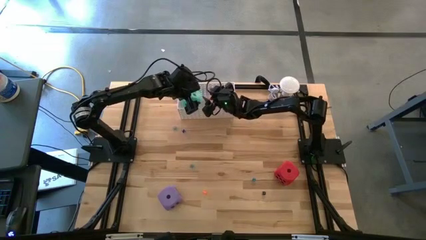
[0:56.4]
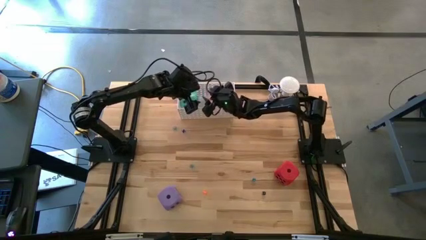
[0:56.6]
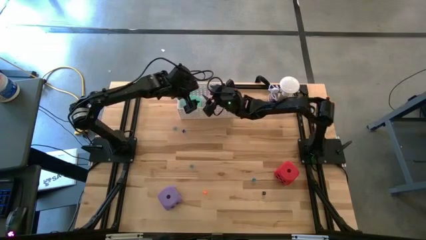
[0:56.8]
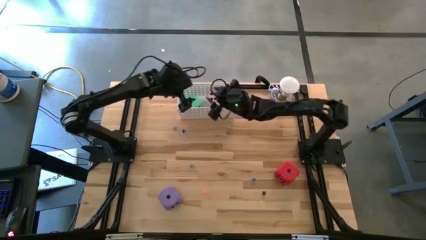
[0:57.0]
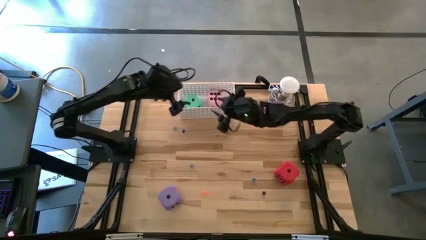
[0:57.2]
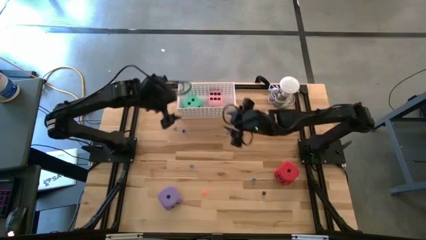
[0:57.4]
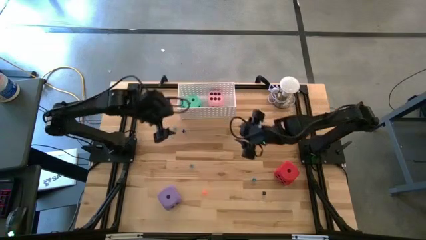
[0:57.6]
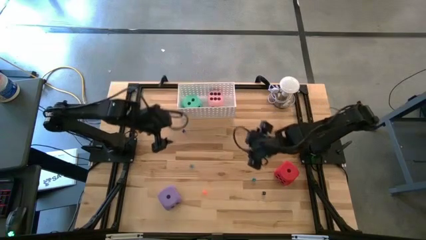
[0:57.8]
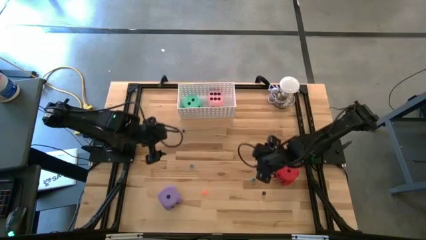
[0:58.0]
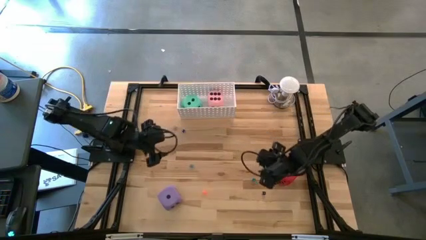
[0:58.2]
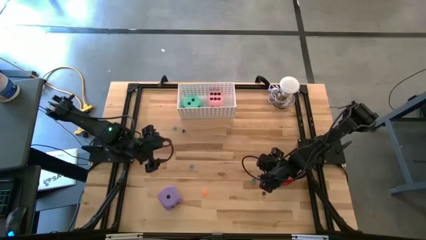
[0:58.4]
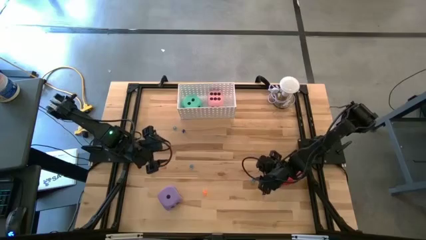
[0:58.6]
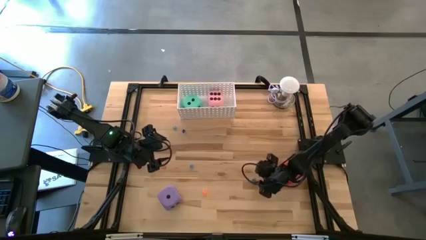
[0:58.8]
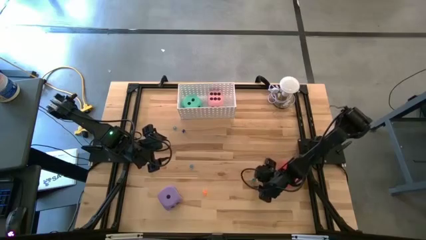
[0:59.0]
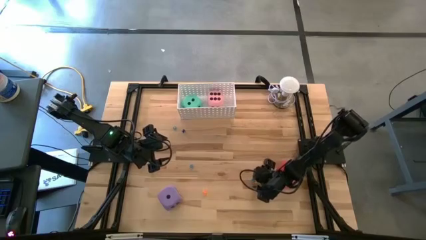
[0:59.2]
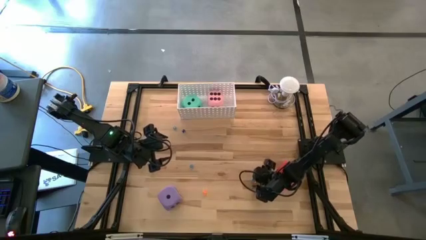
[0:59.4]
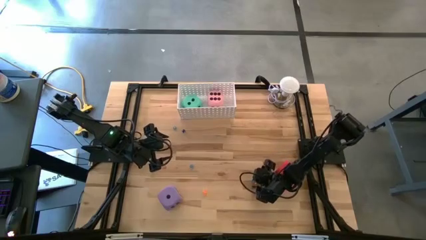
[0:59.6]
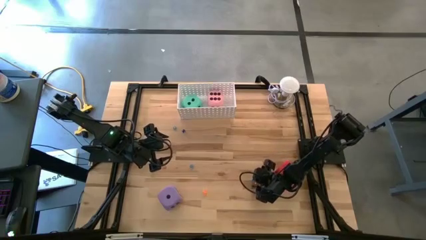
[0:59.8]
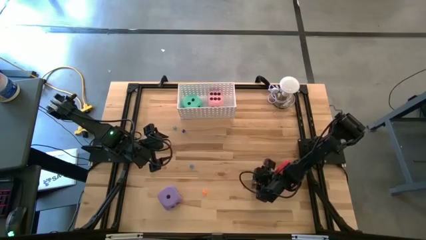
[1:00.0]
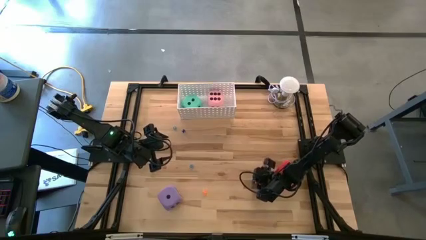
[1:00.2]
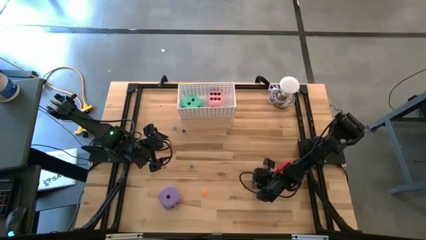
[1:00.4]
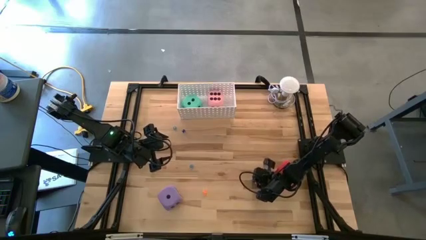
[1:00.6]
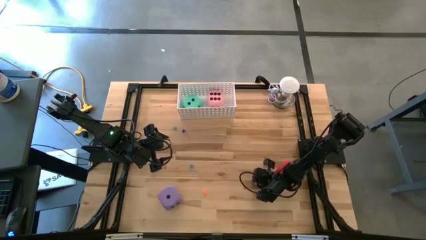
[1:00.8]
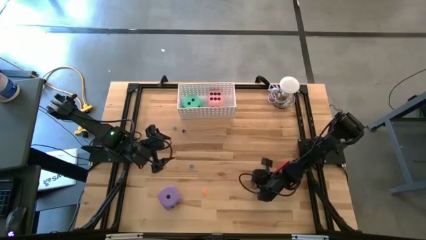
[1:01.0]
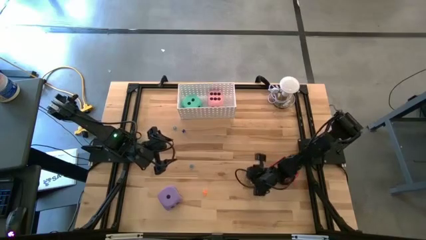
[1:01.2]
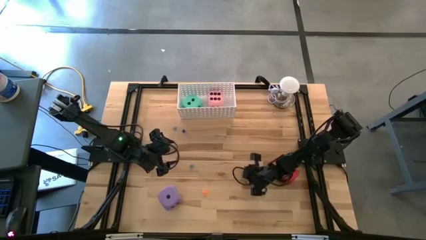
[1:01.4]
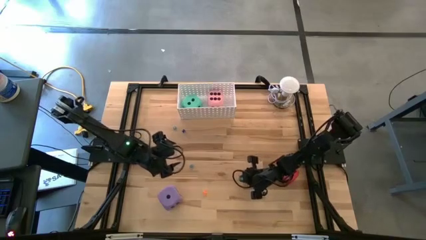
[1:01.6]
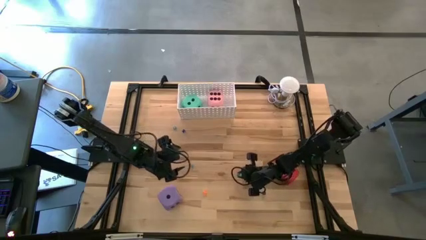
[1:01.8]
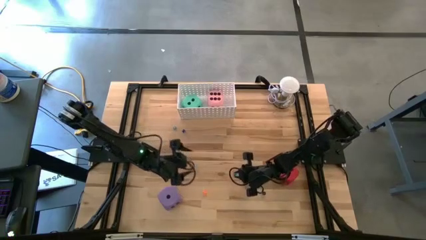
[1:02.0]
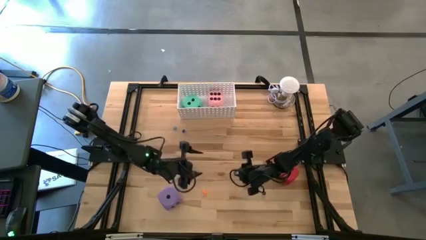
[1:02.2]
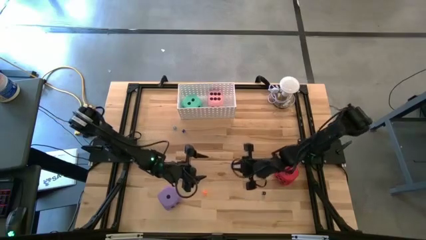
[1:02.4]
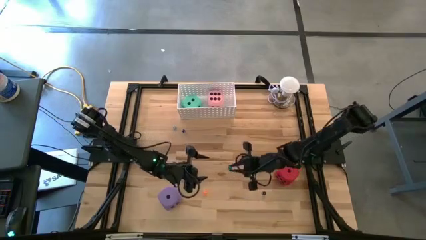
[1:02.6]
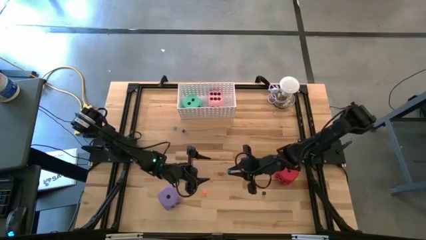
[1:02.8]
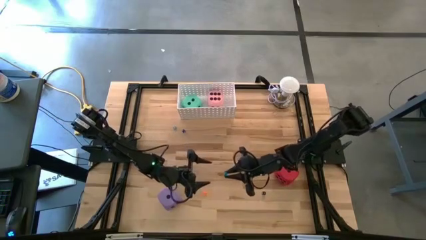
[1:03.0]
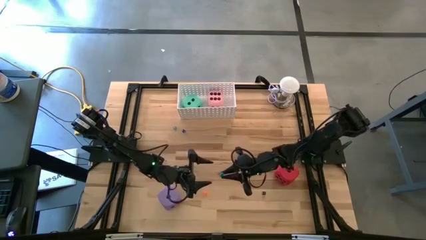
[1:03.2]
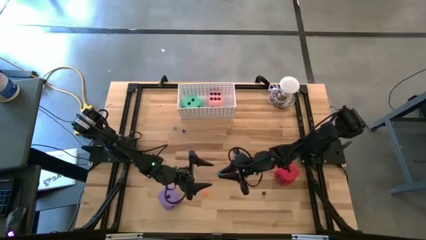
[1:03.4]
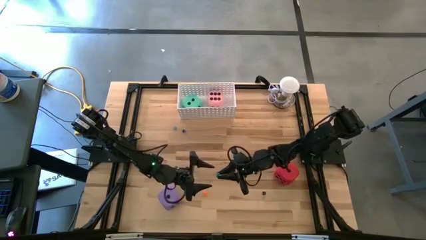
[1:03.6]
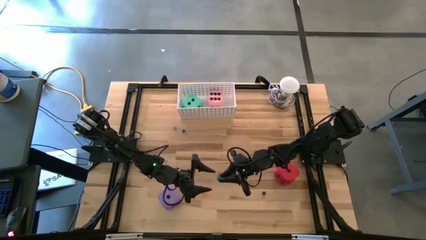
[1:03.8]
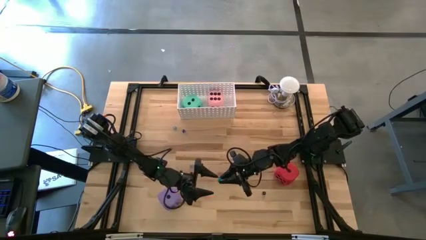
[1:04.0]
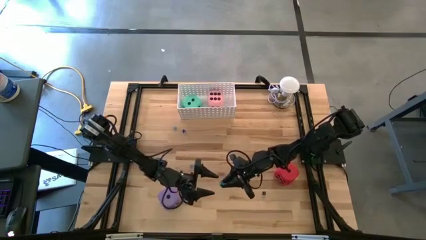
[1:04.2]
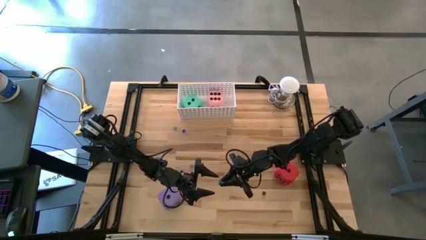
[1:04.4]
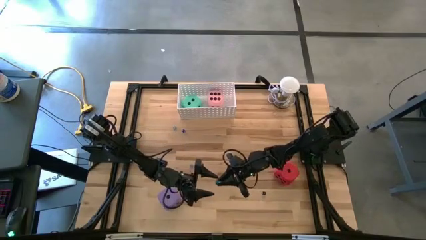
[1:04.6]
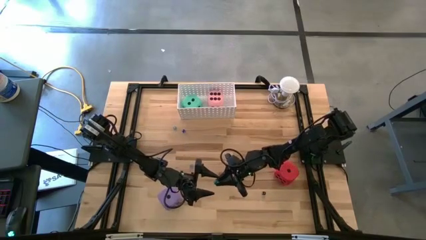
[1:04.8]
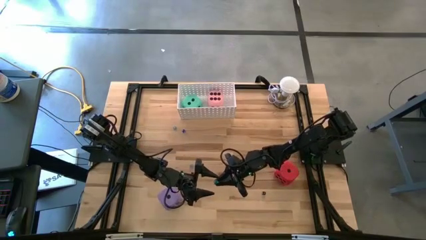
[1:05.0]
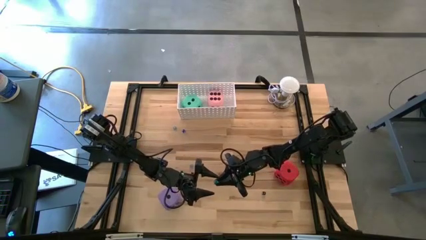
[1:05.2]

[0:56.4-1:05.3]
Task: Pick & Place Dice
Put the small blue dice into the white basket

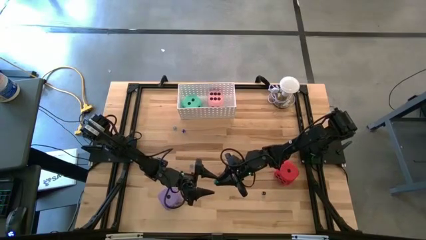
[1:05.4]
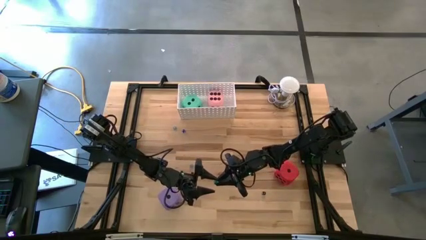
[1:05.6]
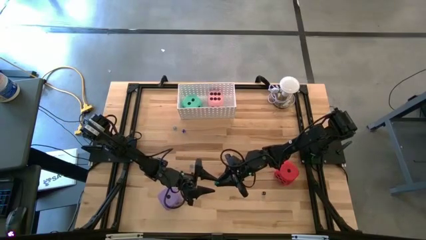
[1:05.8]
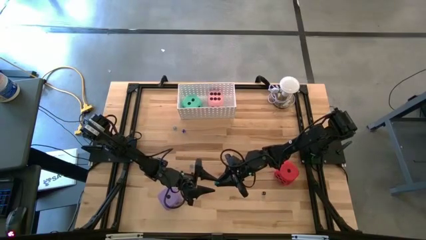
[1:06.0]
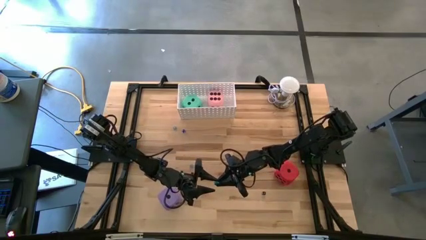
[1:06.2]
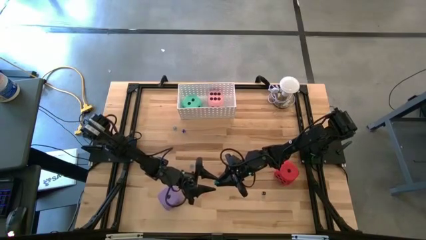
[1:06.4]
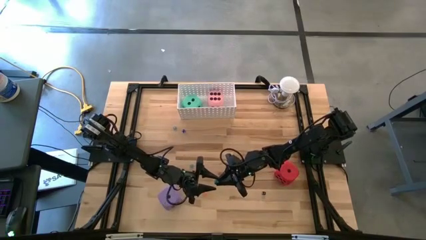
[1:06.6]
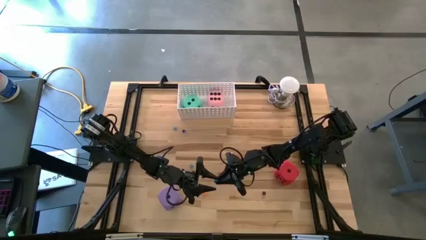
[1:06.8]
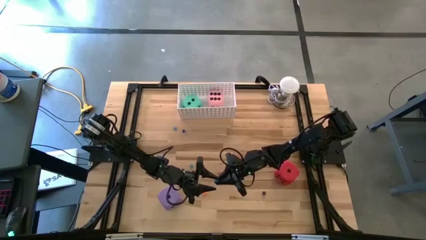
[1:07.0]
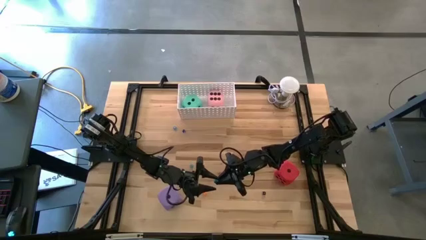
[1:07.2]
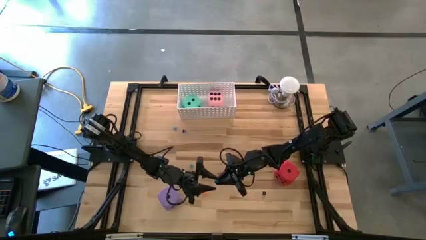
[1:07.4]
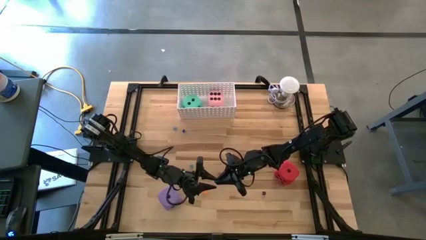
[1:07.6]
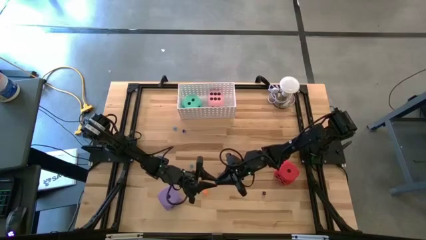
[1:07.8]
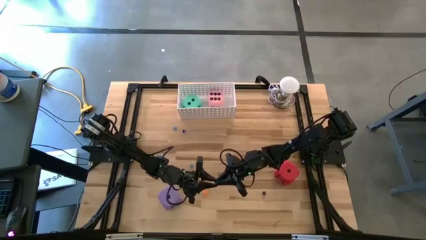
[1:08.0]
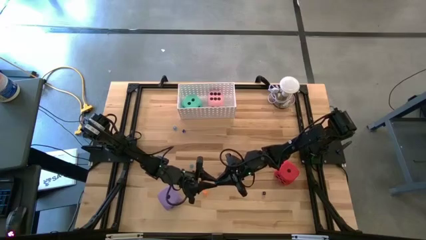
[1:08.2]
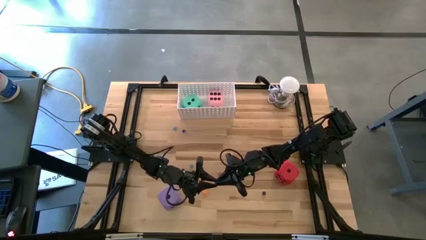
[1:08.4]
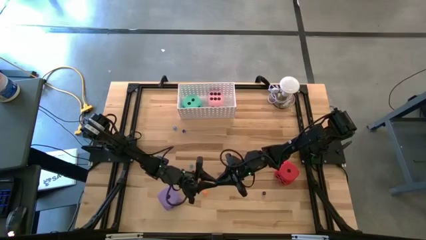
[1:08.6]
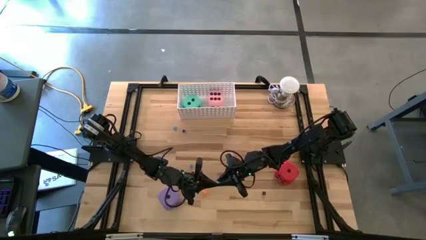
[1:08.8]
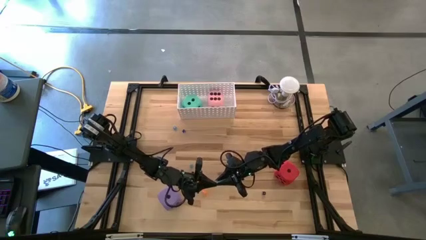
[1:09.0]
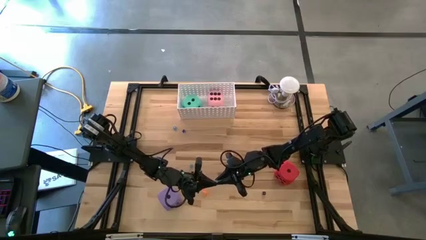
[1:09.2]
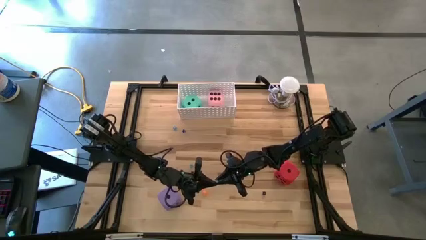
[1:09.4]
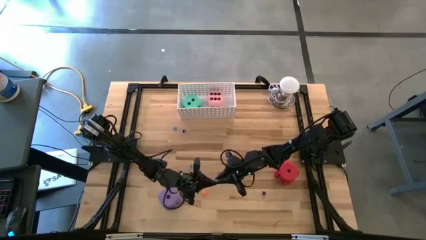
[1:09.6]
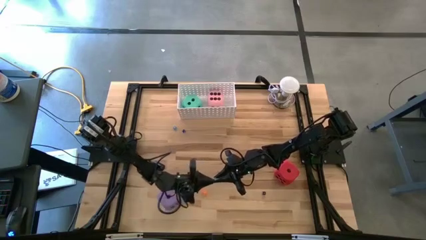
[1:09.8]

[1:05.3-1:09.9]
Put the small blue dice into the white basket

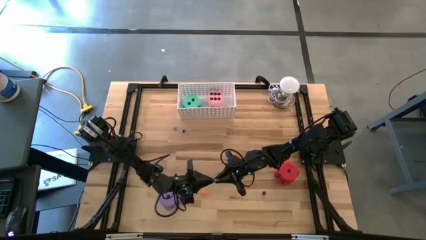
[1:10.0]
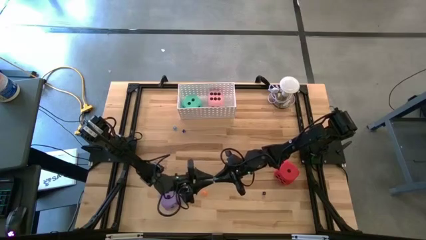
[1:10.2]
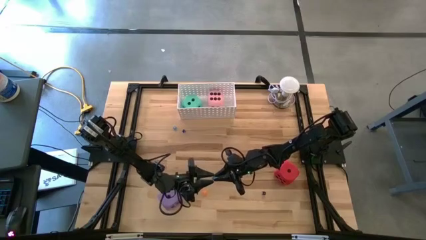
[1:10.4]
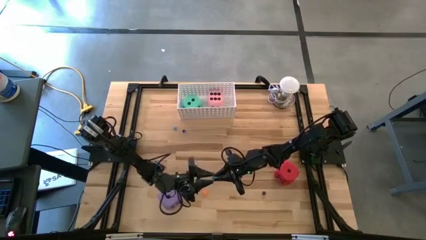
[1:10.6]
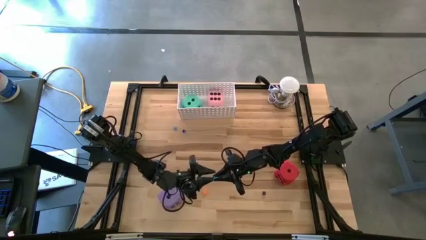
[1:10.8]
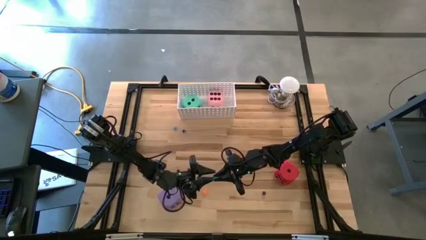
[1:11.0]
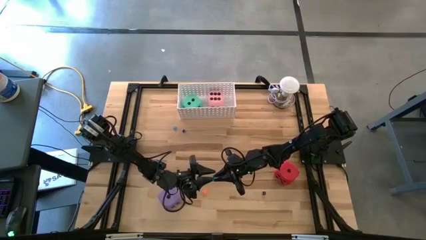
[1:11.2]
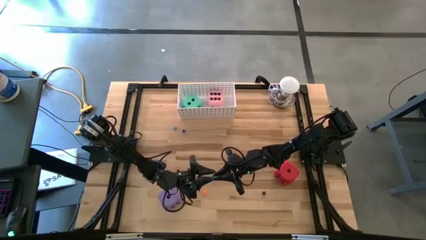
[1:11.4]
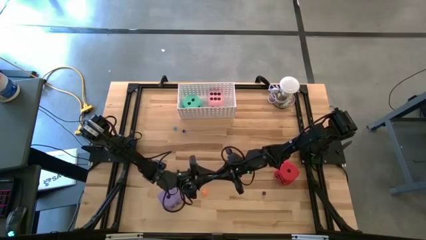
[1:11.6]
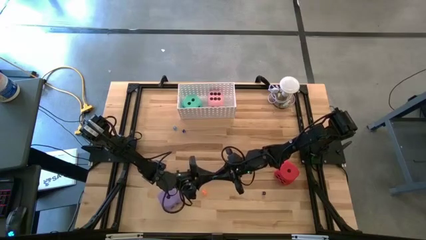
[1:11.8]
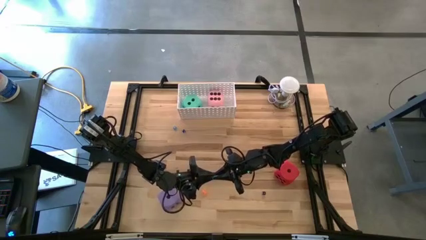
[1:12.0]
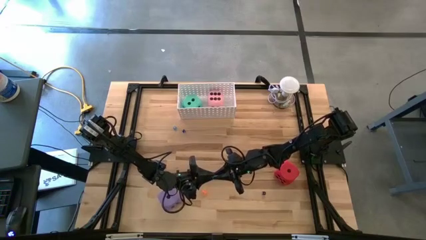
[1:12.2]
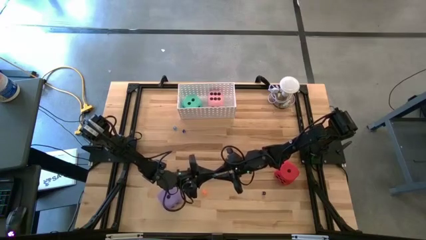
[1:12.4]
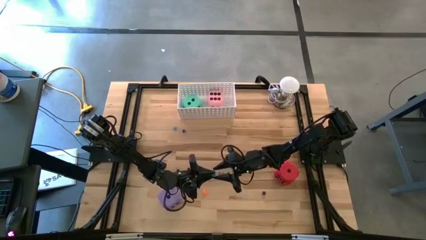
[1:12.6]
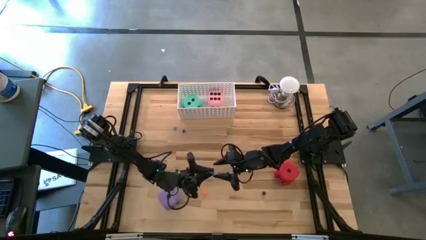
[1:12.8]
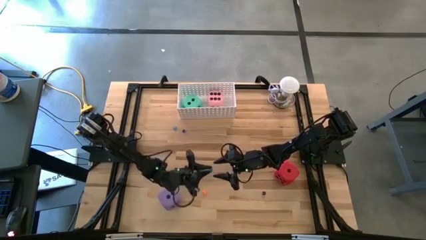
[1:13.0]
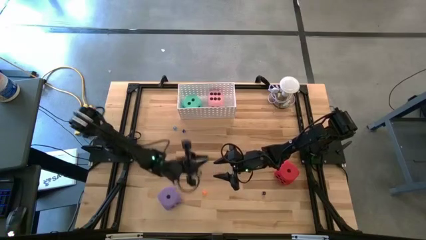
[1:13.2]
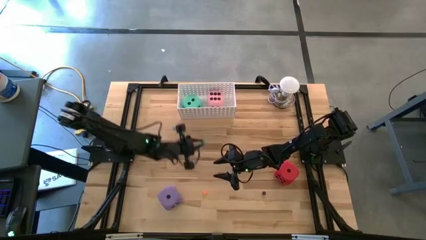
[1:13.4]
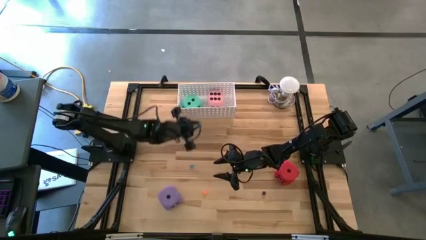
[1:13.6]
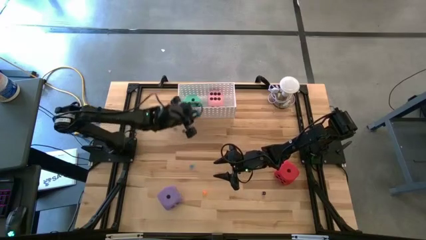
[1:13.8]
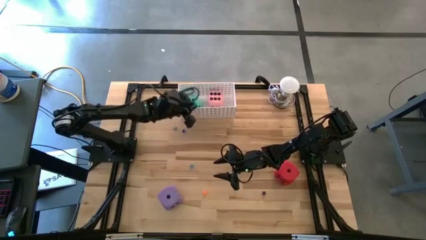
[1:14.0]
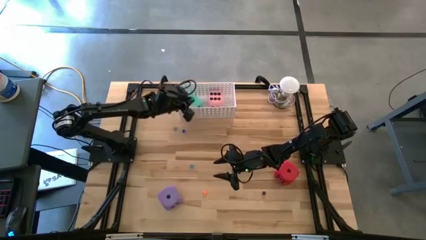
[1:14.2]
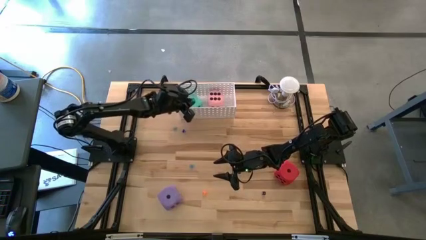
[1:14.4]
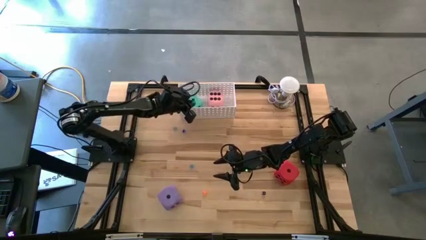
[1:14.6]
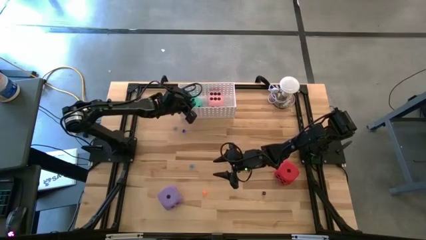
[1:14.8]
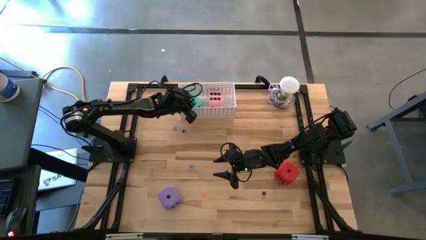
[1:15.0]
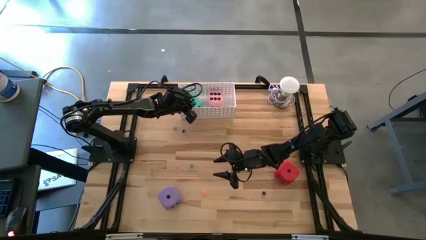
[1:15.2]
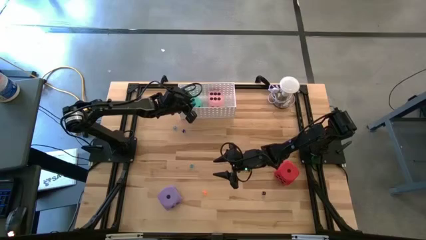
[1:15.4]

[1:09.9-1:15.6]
Put the small blue dice into the white basket
